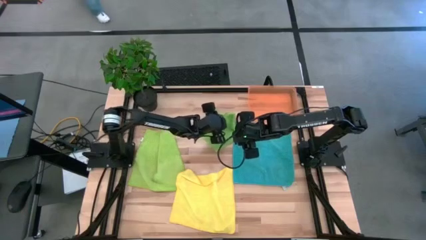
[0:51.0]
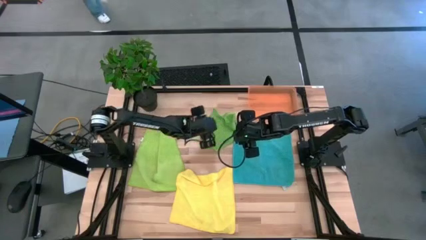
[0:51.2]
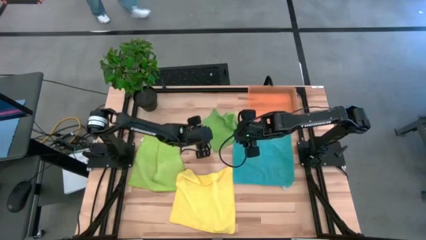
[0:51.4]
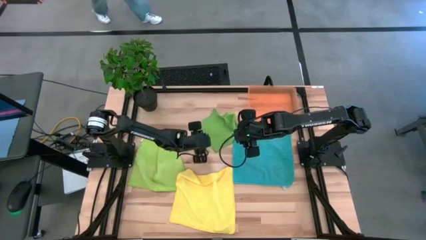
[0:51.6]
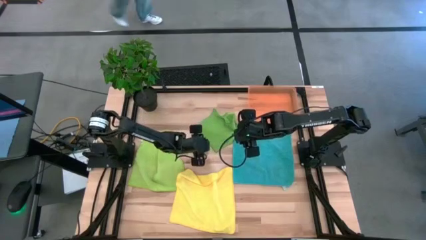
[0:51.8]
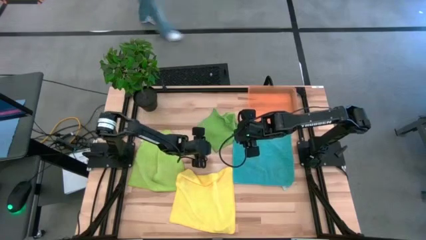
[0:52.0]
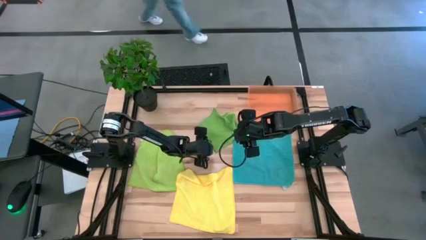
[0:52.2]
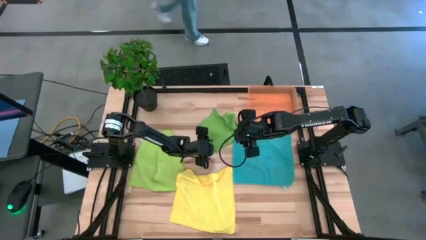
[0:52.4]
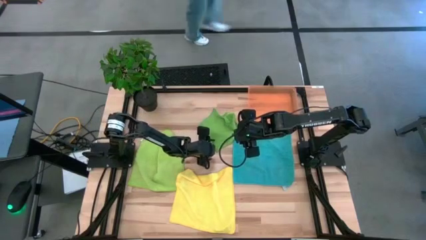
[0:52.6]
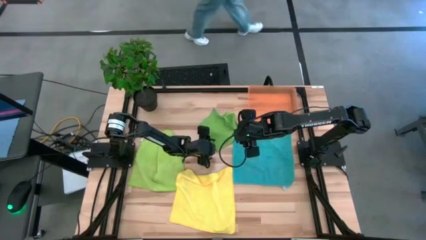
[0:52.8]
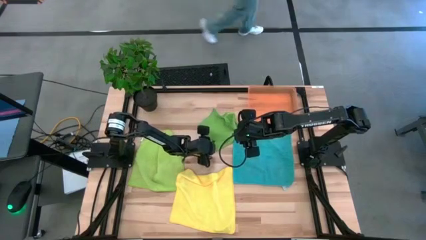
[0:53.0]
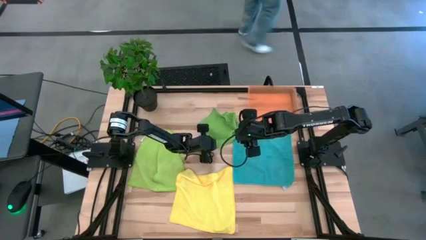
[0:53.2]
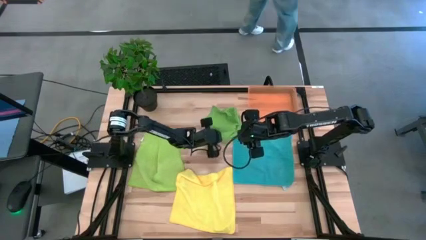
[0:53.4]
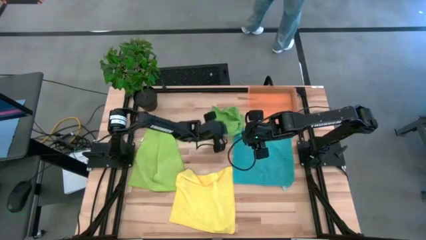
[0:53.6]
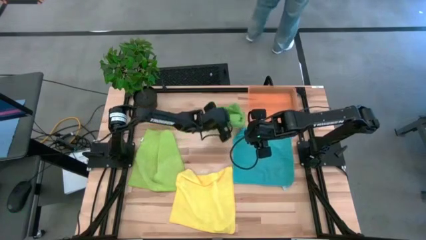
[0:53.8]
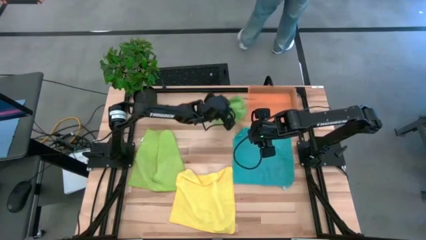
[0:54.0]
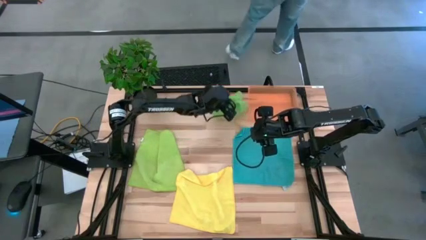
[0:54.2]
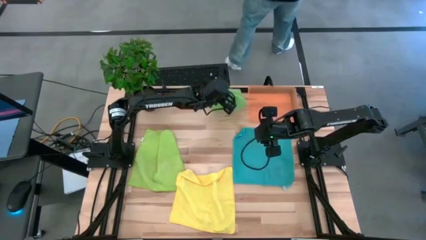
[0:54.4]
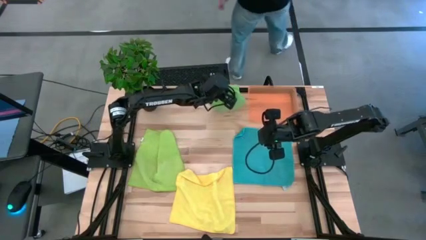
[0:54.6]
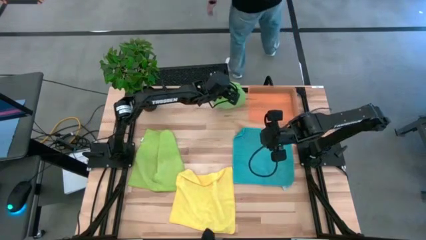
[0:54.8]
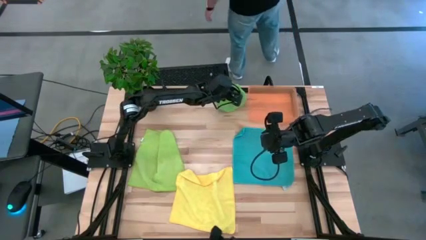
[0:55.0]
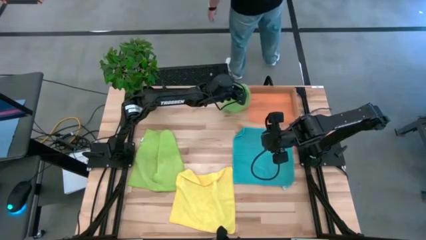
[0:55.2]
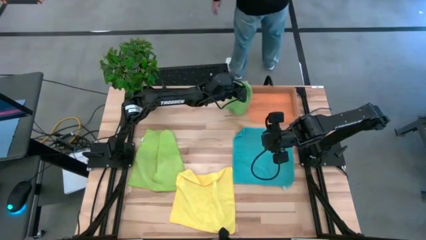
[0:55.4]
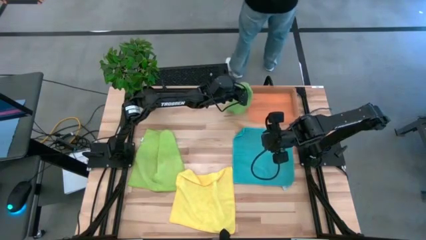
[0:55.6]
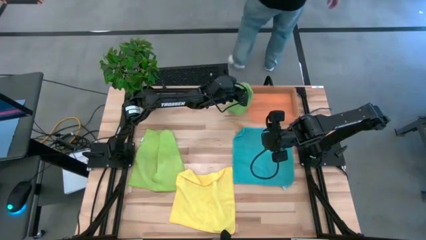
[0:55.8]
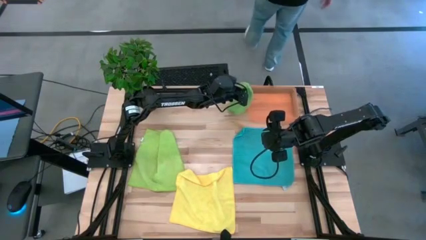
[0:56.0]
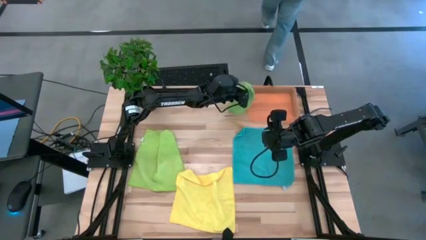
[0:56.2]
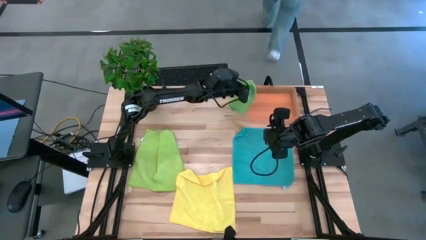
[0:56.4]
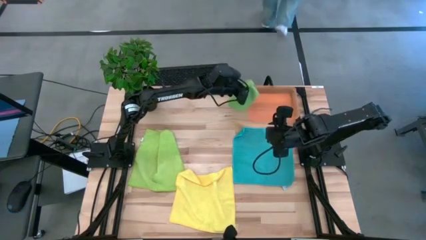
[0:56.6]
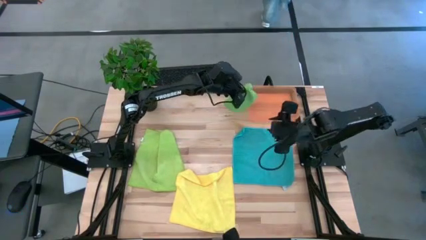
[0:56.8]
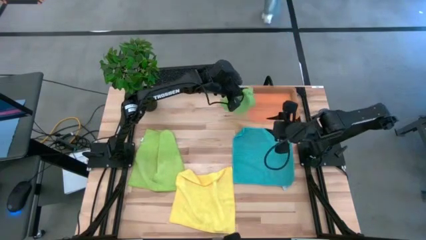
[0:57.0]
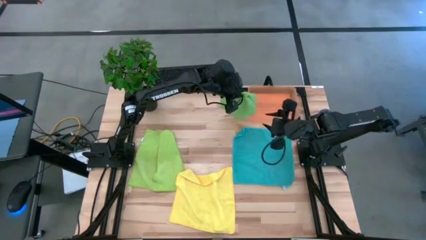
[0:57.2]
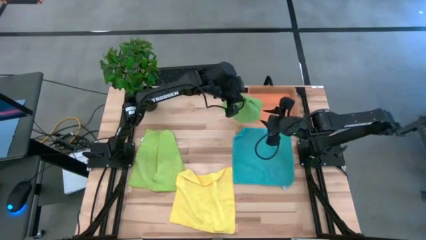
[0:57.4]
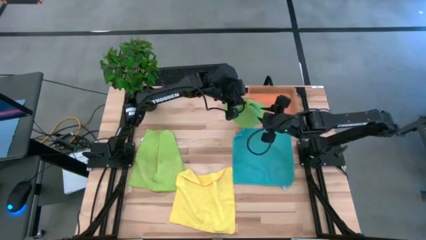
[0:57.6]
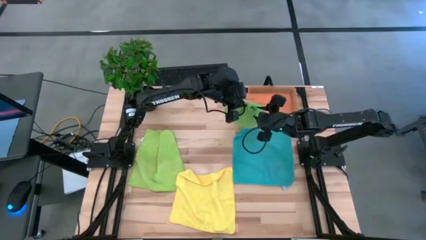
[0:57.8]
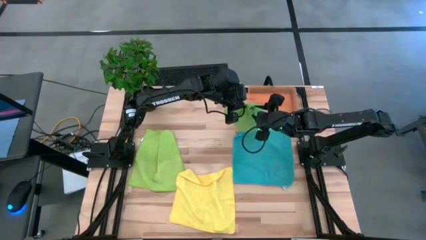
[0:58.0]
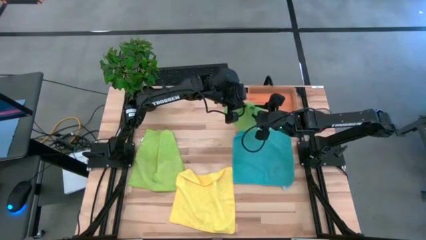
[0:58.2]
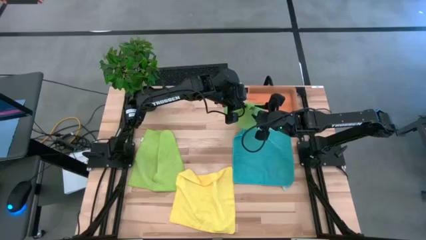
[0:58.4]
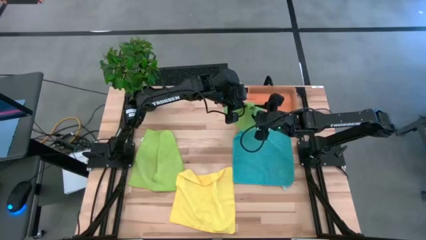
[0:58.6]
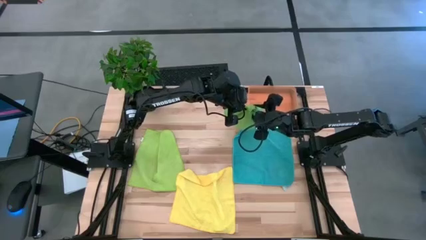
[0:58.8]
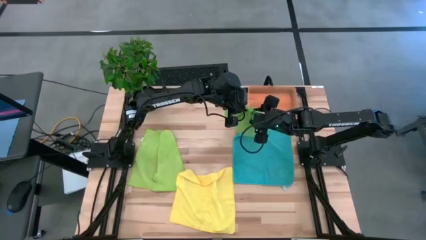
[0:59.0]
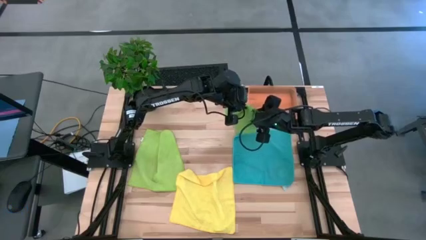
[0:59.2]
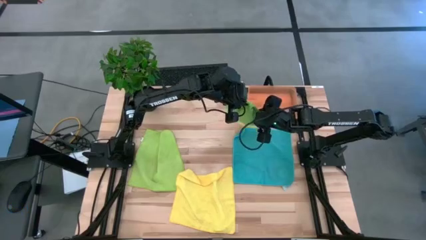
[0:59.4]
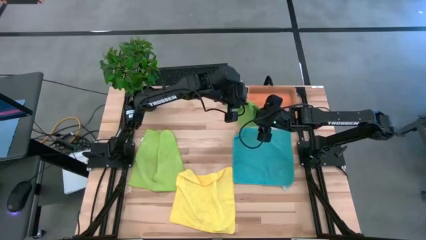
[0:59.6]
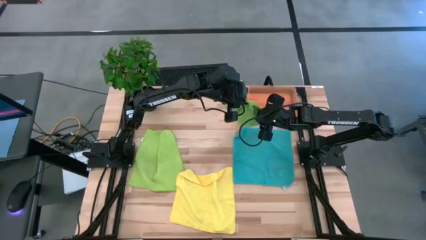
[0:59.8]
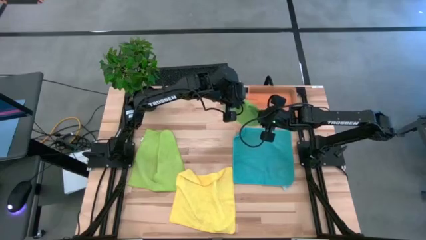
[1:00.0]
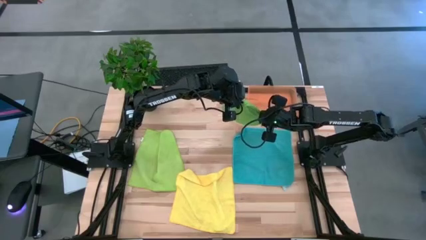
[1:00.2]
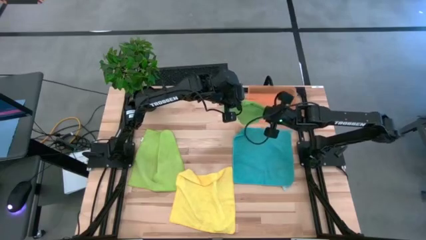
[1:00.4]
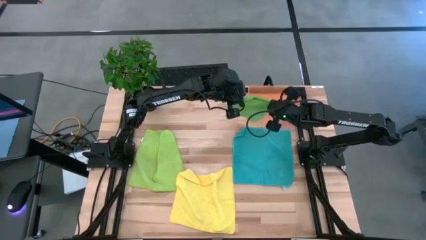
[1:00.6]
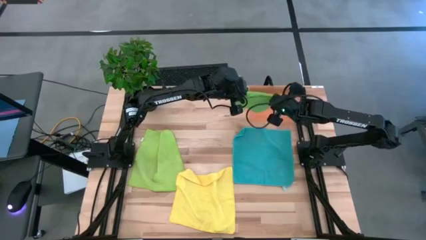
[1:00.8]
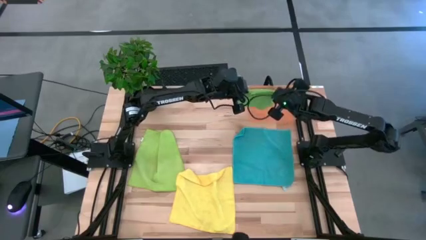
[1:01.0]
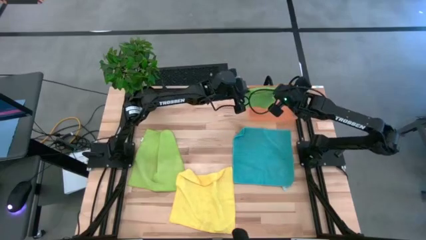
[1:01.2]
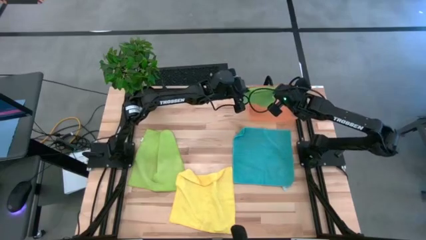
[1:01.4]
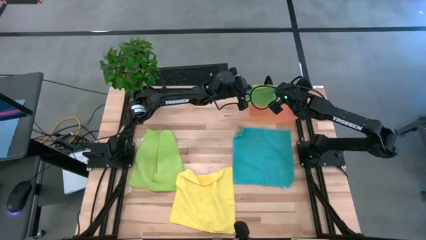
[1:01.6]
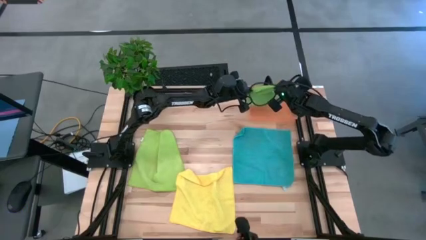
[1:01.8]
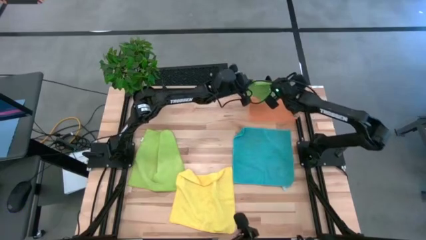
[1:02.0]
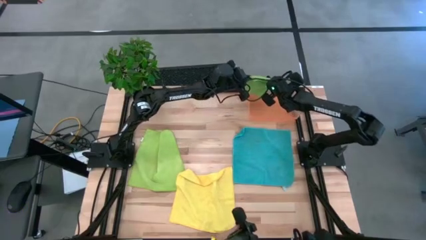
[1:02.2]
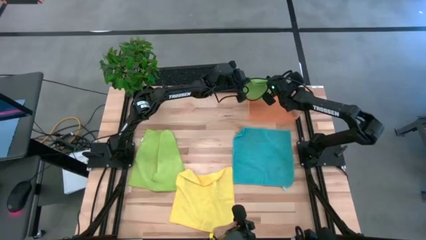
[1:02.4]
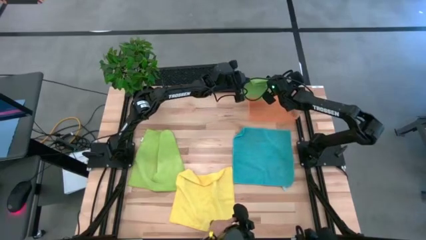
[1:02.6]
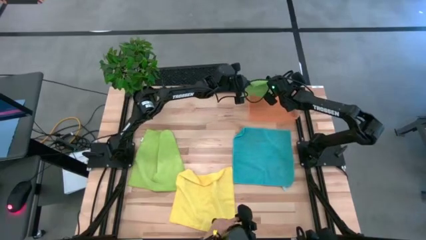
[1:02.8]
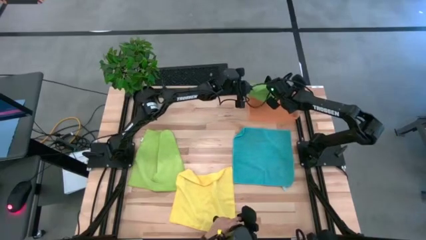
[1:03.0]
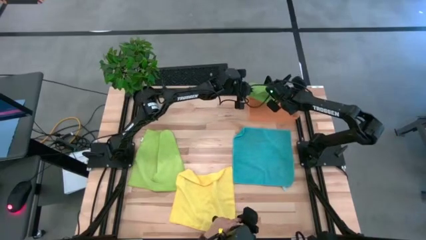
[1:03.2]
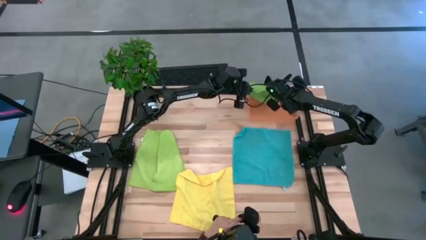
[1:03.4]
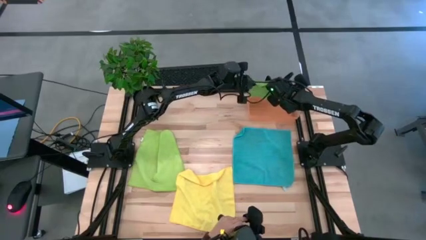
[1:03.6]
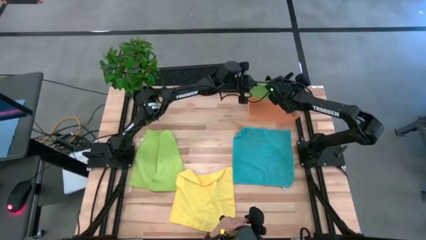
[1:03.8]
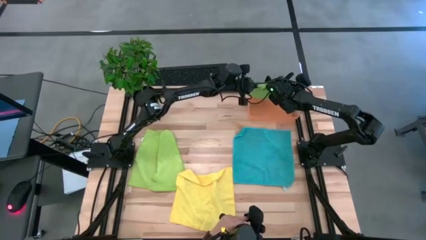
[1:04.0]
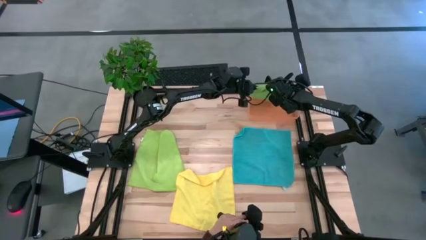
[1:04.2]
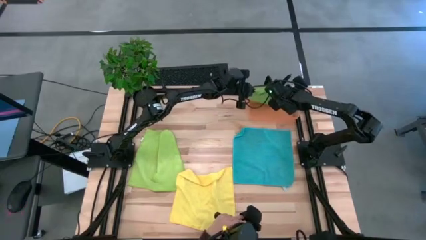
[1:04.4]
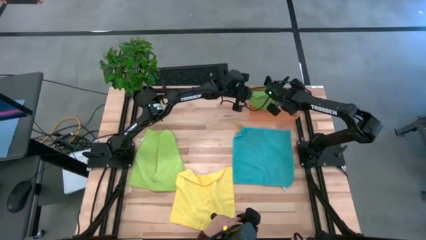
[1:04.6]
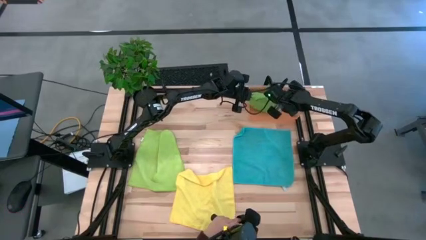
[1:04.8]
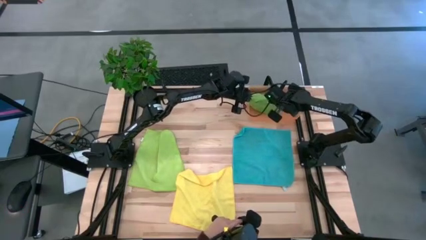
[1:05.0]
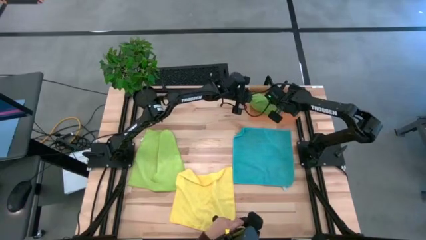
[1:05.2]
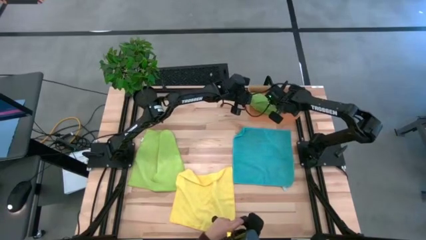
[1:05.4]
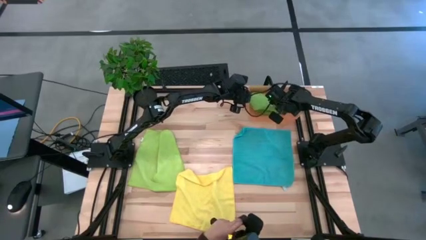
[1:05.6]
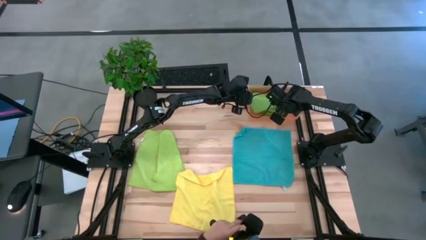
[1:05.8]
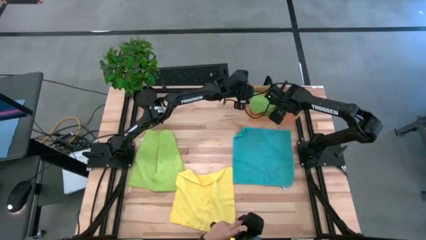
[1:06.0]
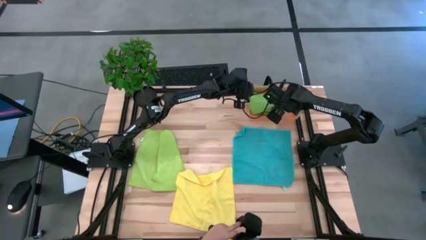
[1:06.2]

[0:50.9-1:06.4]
Task: Fold microfiber towels
Put the green microfiber towel into the orange bin
